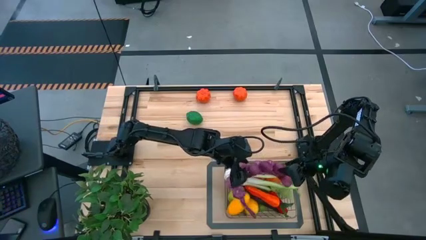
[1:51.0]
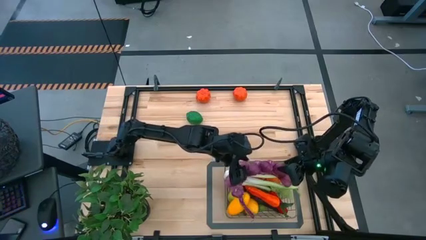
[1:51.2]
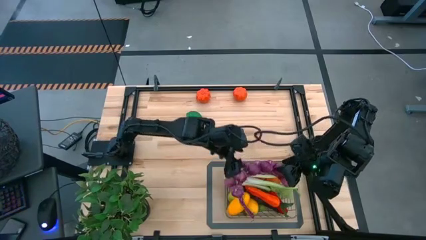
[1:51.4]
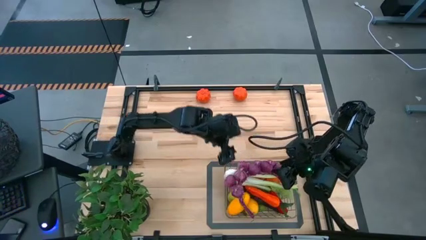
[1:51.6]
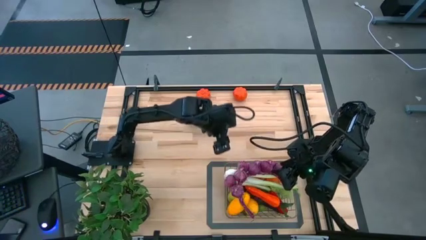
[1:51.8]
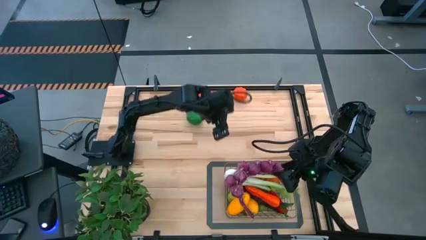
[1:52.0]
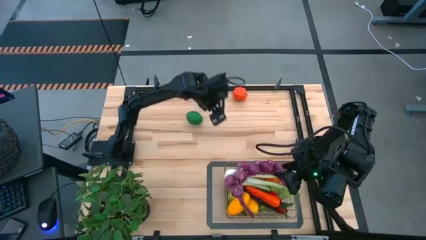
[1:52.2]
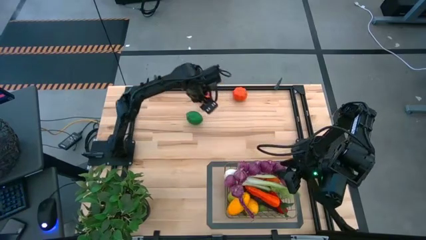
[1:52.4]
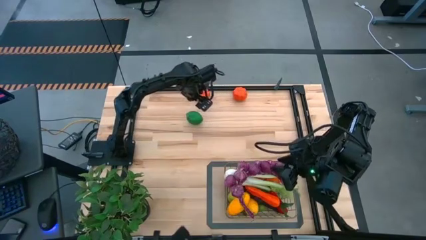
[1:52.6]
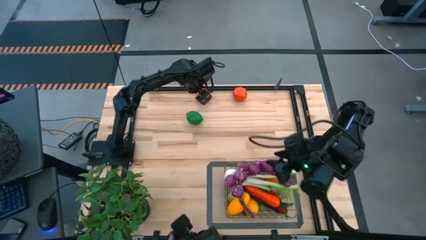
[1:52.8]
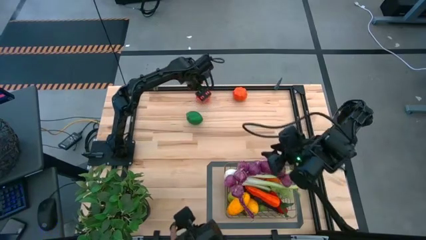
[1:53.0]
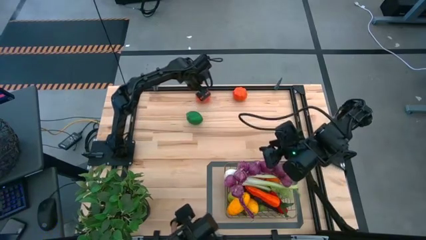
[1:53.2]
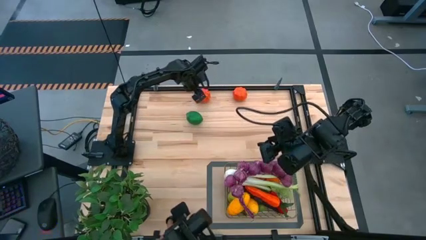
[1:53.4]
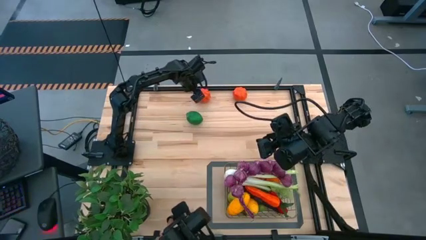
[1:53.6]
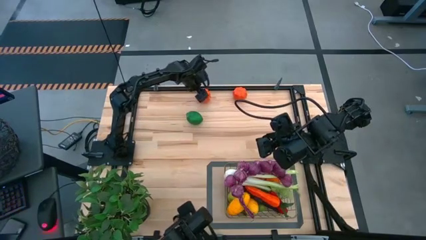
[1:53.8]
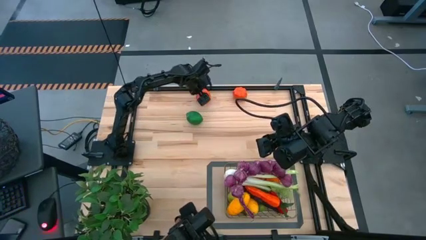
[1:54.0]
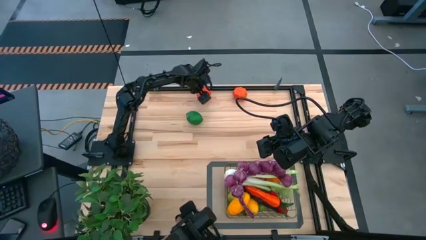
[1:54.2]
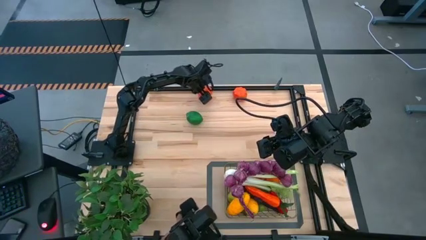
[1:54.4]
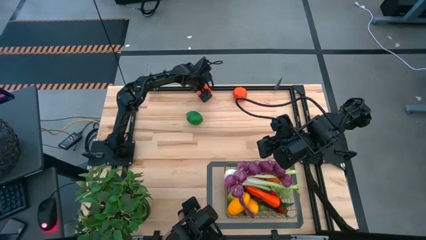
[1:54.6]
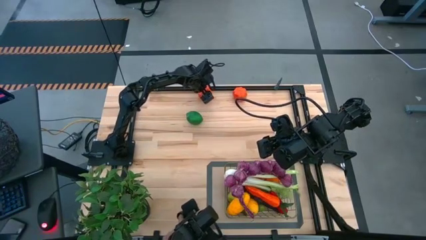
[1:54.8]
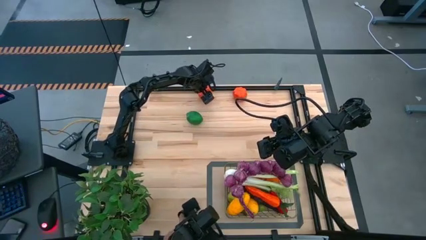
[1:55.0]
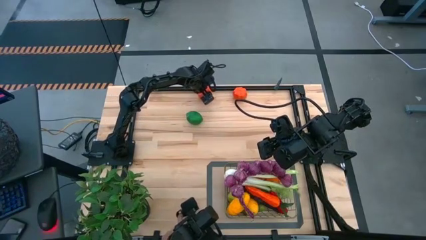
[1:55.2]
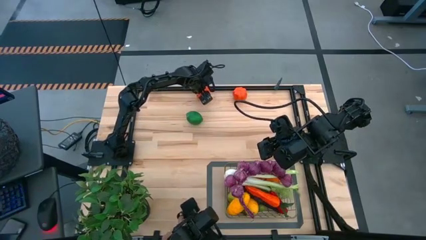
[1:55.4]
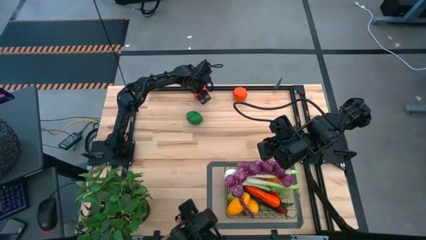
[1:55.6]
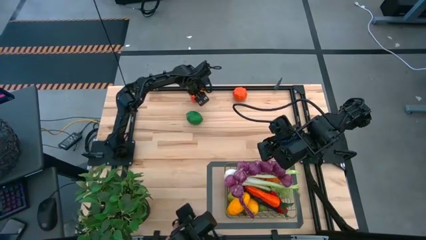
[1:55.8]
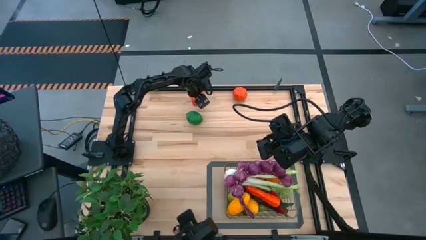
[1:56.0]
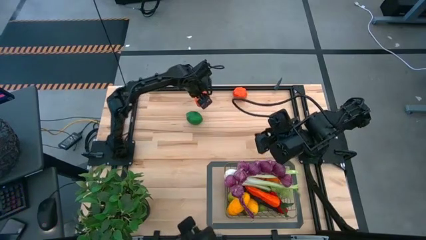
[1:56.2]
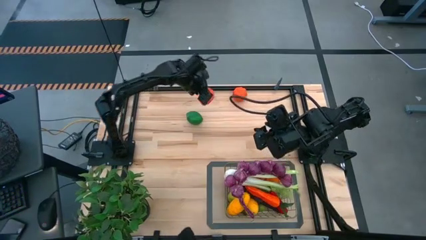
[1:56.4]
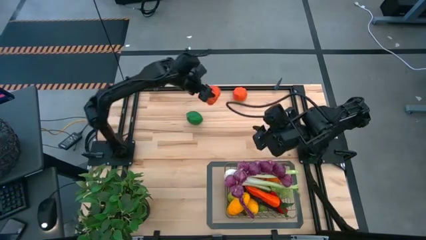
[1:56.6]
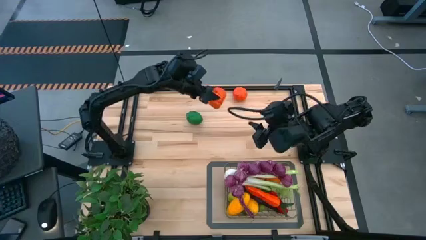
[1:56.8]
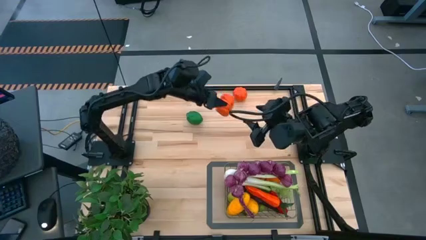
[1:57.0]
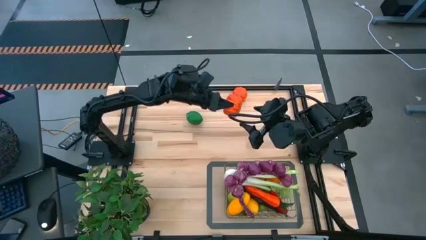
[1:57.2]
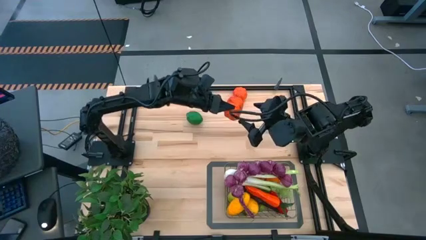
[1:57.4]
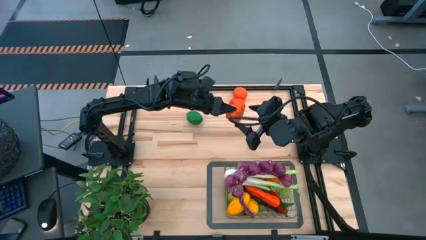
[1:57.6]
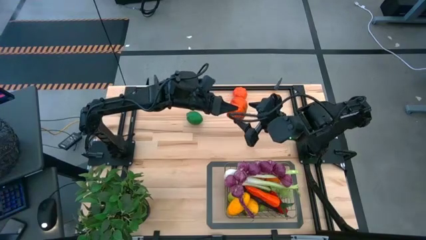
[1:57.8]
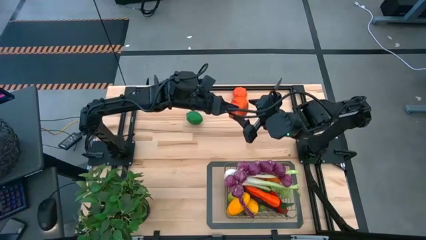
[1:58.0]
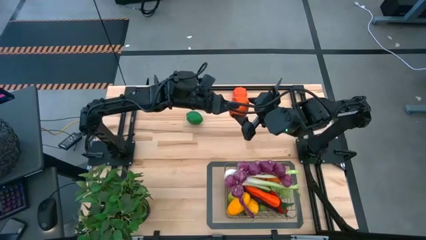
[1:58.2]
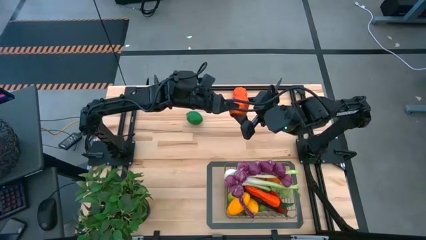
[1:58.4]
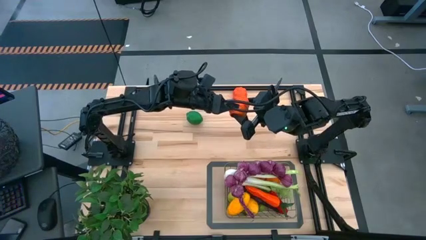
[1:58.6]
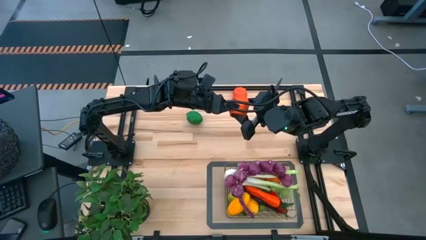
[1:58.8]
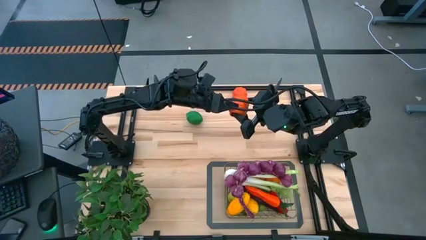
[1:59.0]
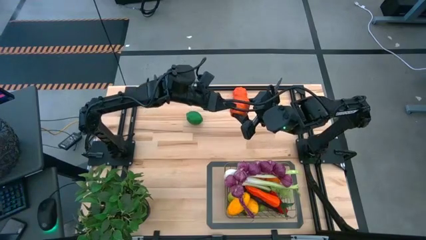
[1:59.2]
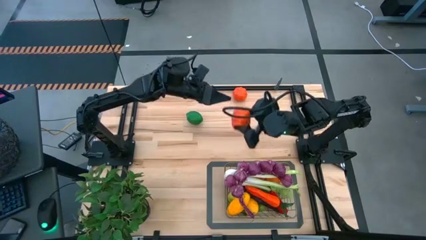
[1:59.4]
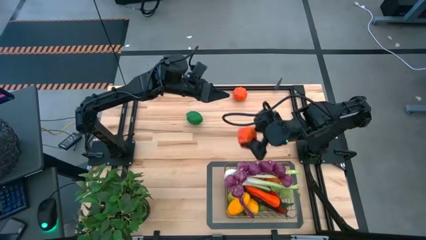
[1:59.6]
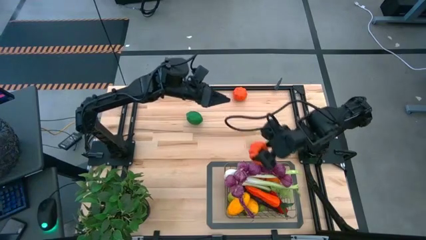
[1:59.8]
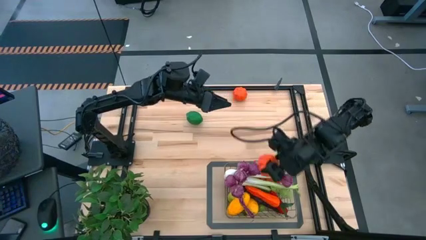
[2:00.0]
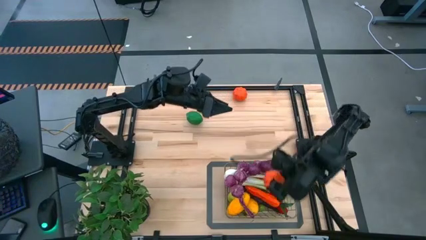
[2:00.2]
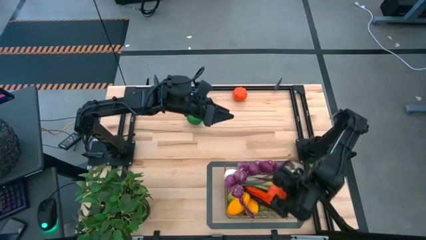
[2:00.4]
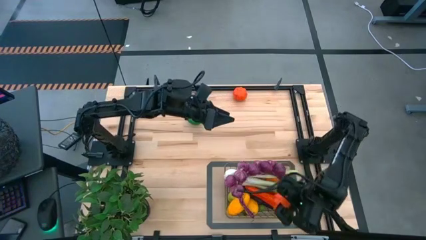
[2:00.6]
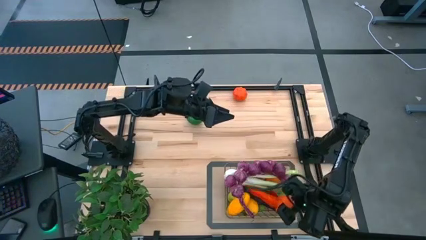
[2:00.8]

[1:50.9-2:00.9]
Task: Build produce basket
Put the left tangerine into the wire basket

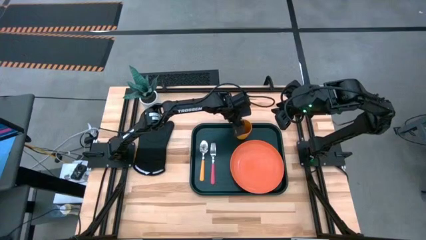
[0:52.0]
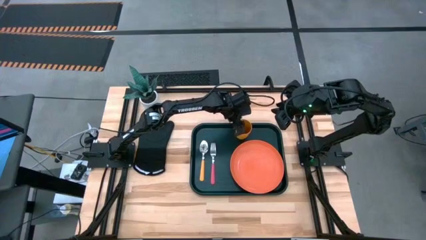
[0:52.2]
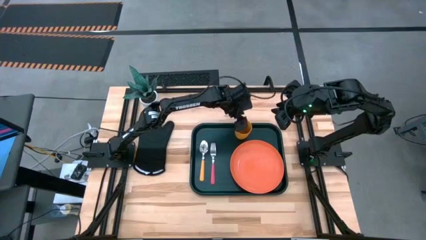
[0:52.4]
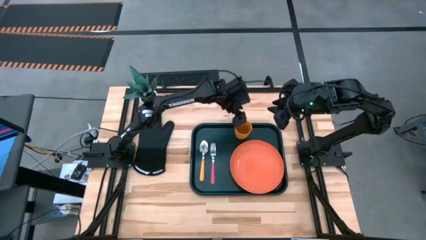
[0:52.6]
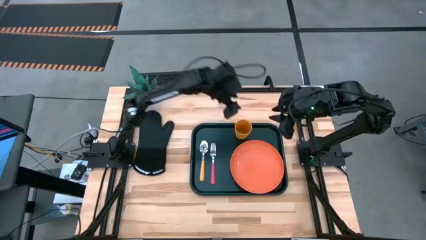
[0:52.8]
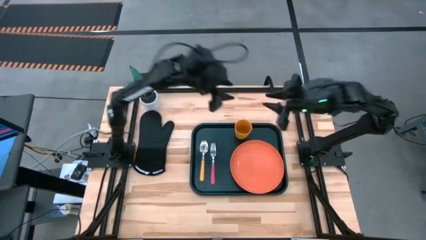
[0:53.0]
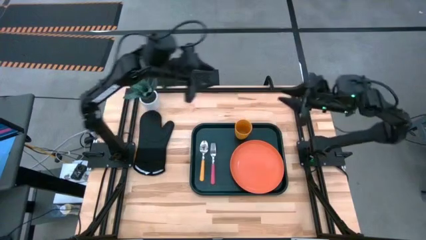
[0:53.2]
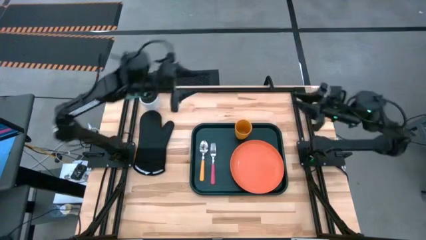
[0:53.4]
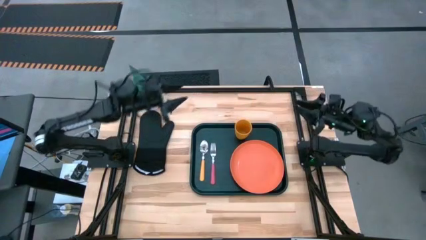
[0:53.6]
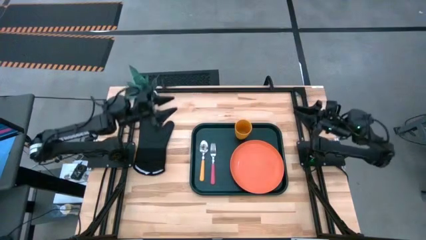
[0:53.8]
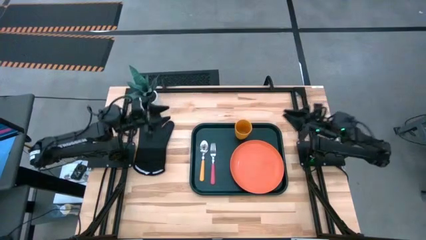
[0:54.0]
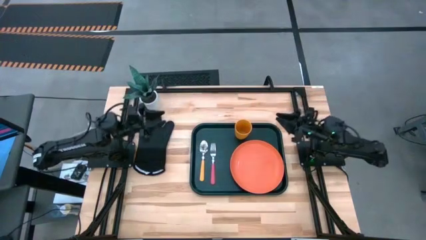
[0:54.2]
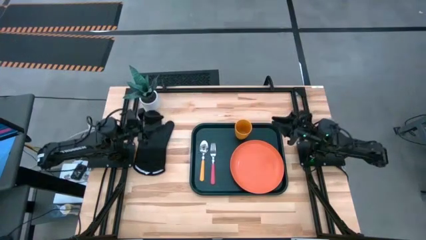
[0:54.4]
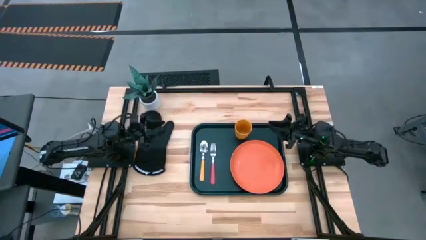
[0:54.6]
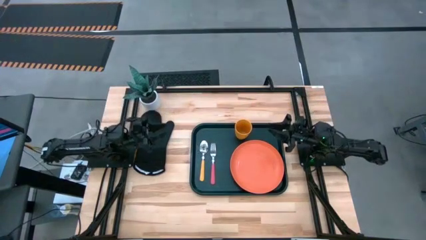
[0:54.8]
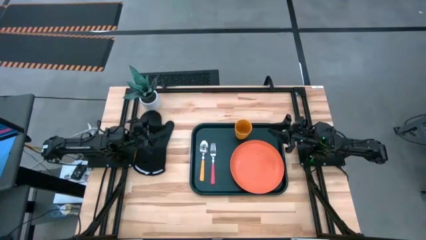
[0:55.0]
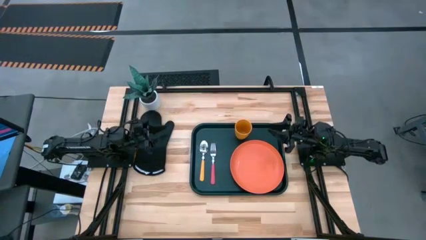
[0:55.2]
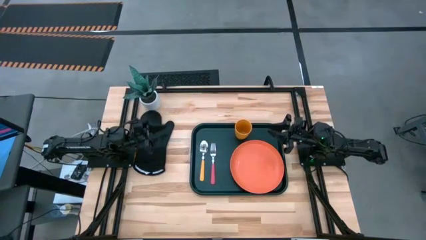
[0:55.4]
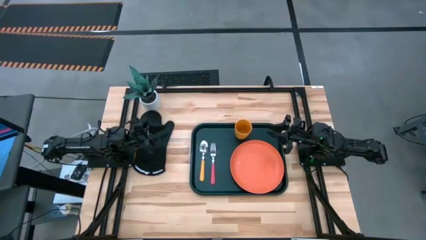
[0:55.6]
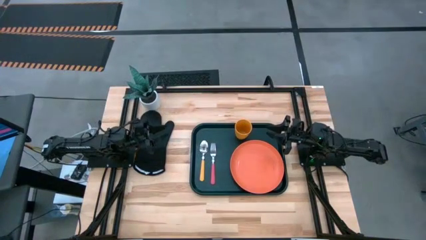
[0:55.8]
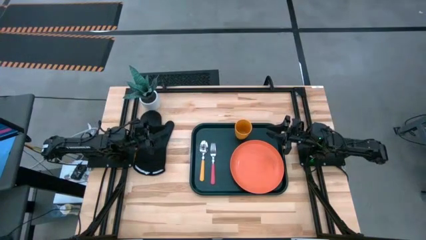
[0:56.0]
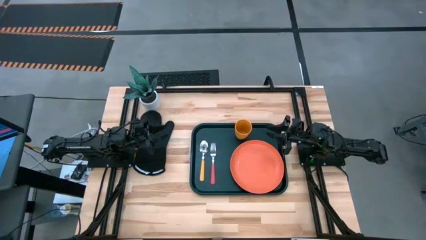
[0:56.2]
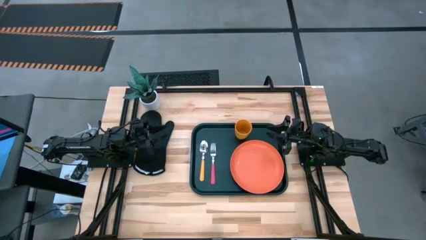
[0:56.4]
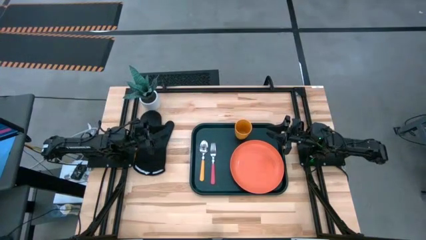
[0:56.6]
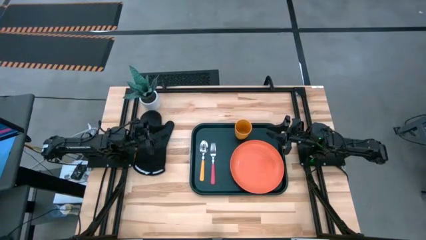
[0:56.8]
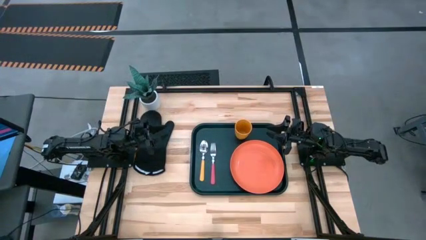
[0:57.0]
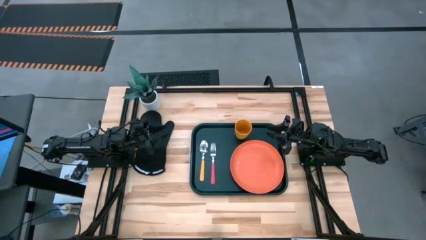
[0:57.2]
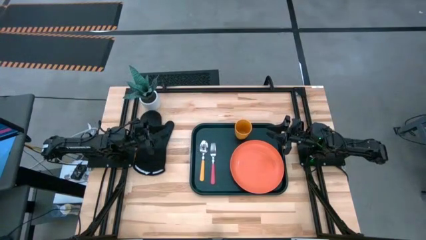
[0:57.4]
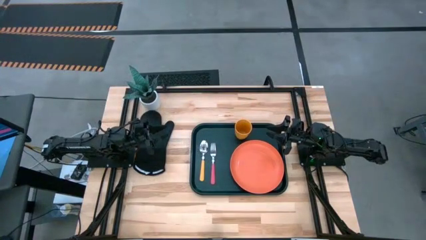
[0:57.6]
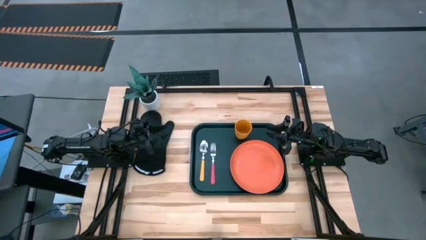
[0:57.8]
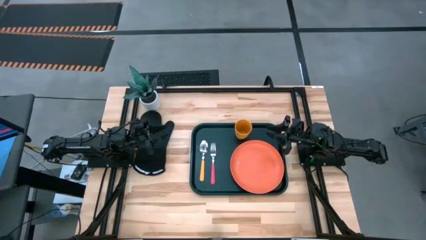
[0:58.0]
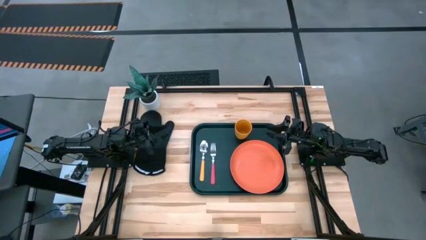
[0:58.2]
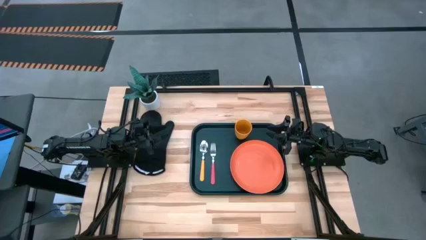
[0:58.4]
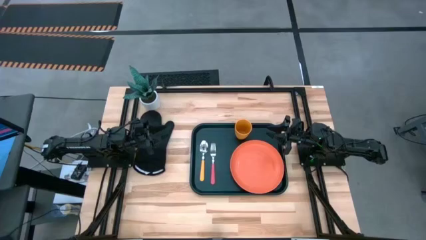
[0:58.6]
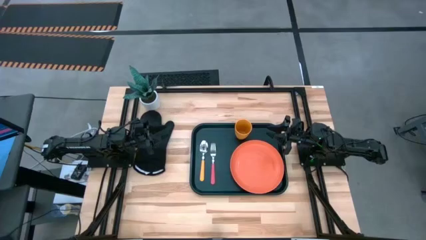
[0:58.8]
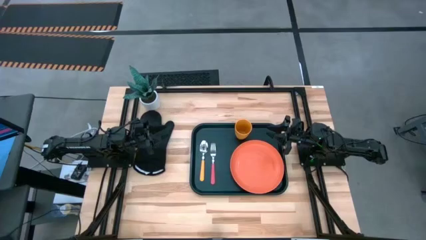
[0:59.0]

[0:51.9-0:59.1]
Task: Pick and place plate/cup/fork/spoon on tray
Return to Home Position
